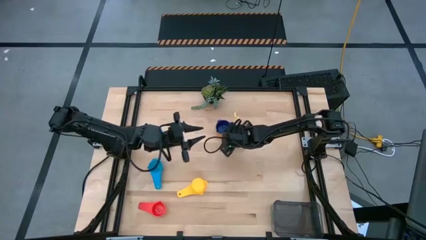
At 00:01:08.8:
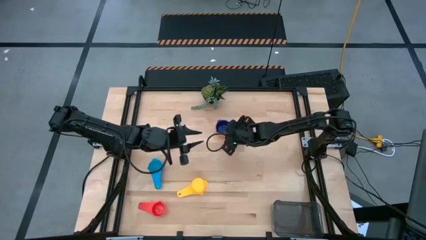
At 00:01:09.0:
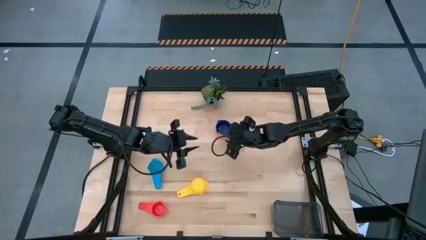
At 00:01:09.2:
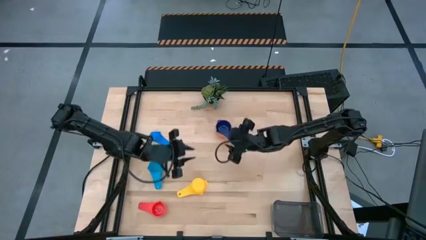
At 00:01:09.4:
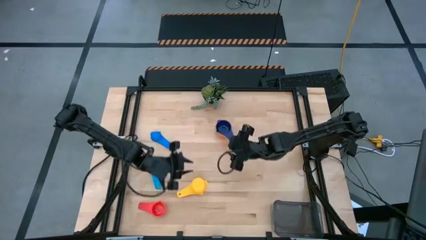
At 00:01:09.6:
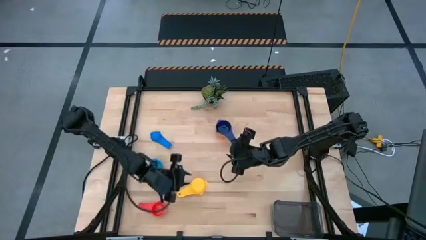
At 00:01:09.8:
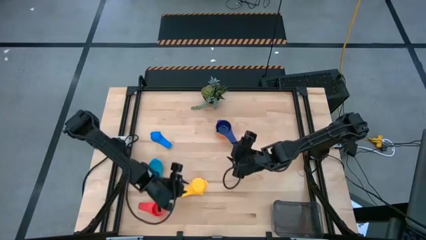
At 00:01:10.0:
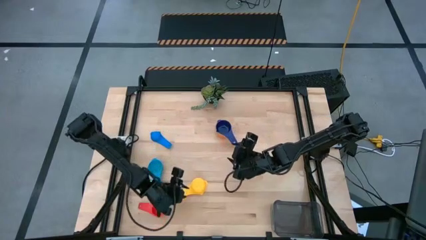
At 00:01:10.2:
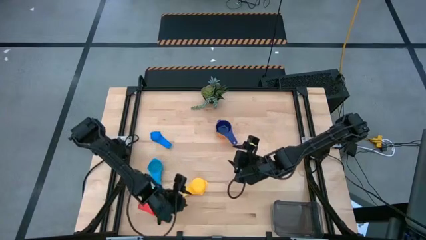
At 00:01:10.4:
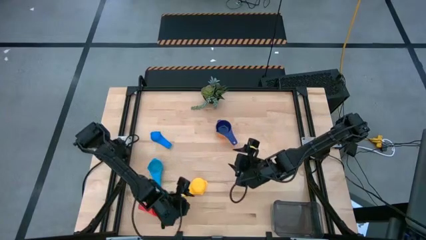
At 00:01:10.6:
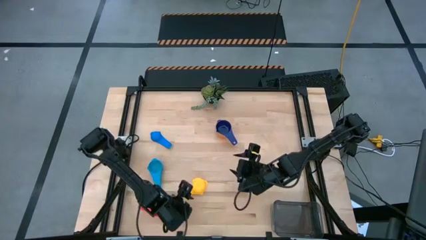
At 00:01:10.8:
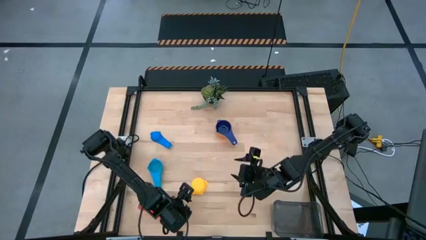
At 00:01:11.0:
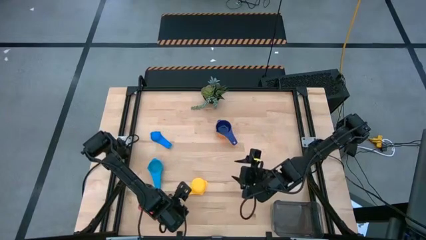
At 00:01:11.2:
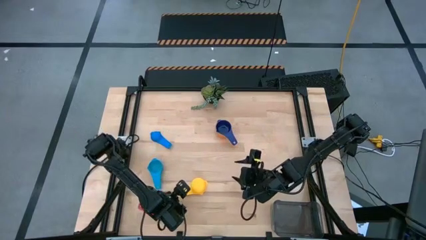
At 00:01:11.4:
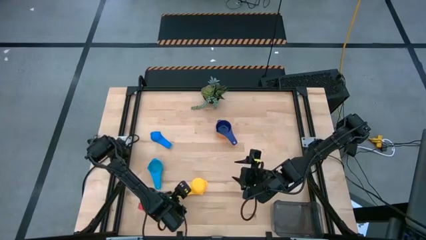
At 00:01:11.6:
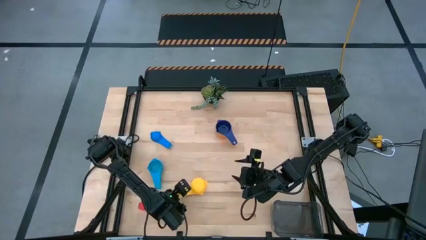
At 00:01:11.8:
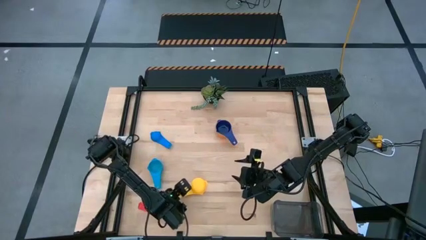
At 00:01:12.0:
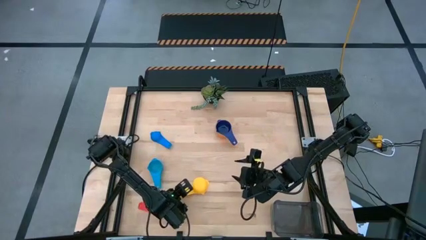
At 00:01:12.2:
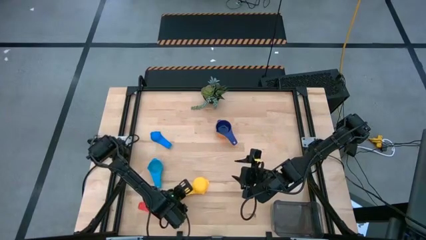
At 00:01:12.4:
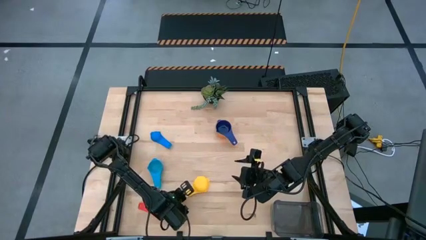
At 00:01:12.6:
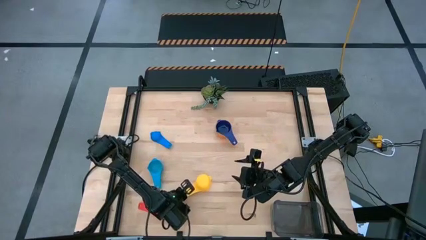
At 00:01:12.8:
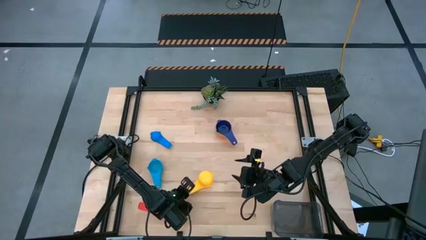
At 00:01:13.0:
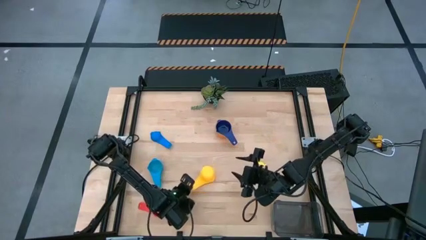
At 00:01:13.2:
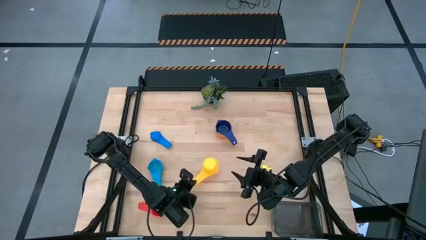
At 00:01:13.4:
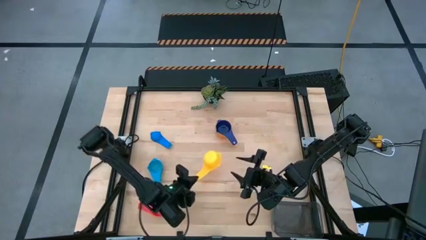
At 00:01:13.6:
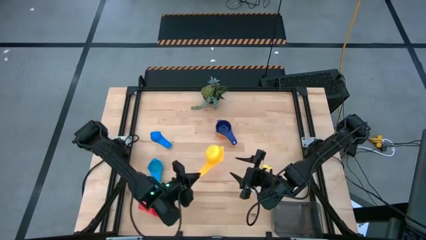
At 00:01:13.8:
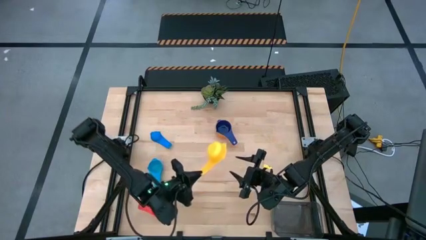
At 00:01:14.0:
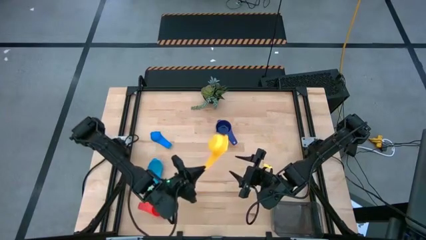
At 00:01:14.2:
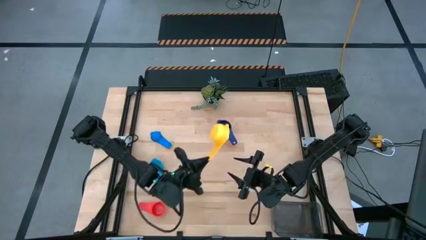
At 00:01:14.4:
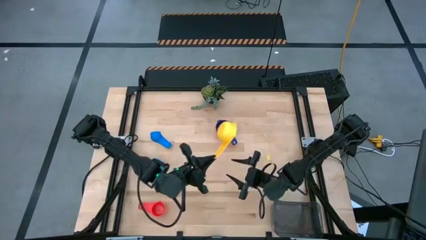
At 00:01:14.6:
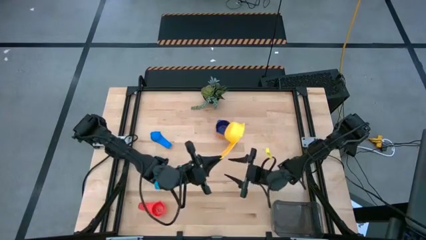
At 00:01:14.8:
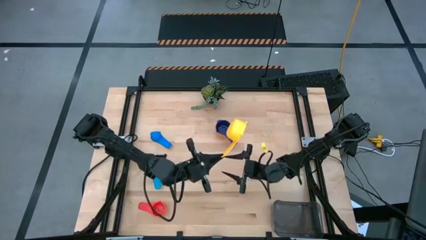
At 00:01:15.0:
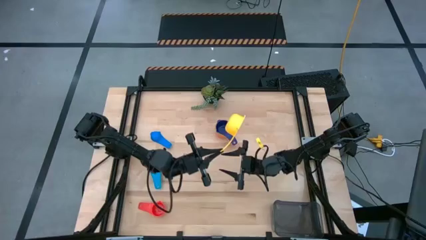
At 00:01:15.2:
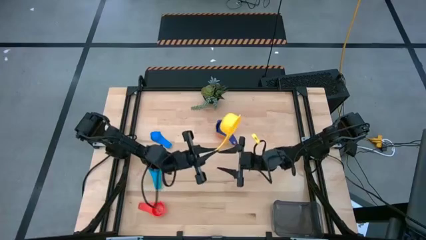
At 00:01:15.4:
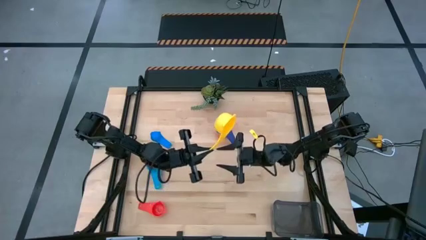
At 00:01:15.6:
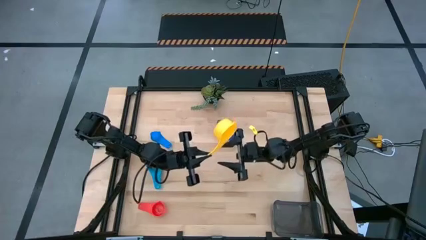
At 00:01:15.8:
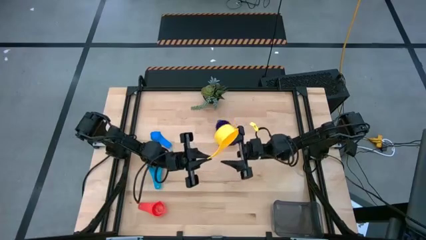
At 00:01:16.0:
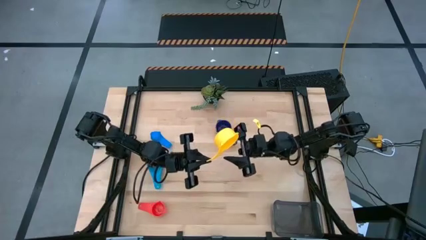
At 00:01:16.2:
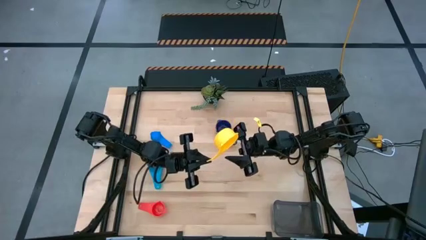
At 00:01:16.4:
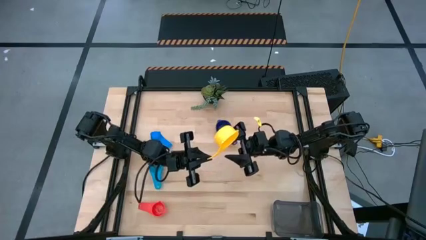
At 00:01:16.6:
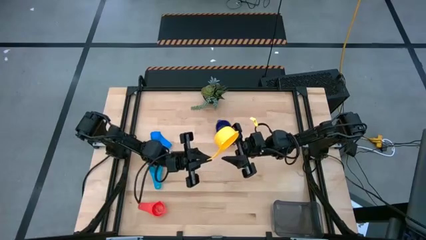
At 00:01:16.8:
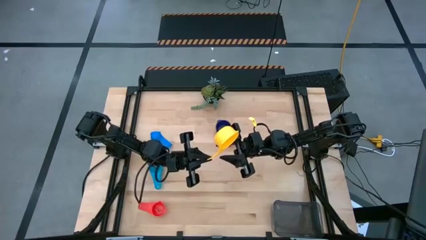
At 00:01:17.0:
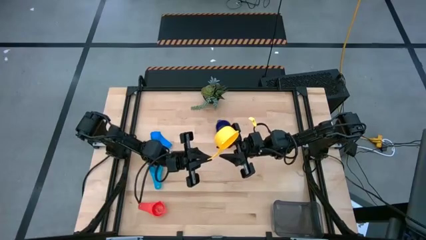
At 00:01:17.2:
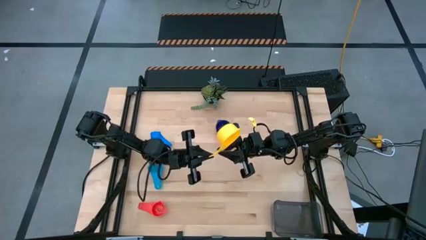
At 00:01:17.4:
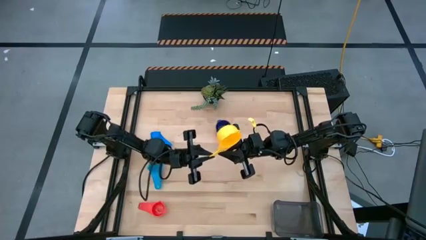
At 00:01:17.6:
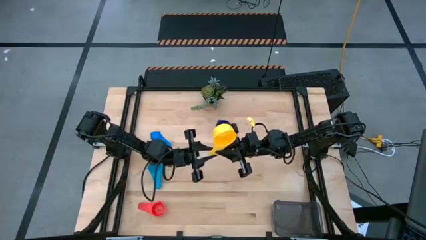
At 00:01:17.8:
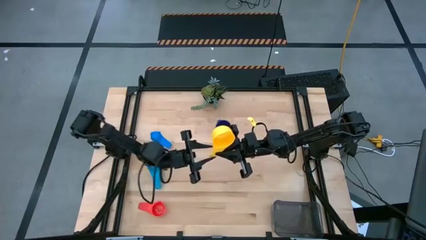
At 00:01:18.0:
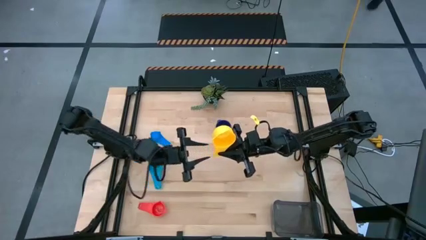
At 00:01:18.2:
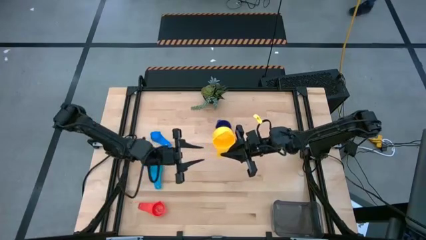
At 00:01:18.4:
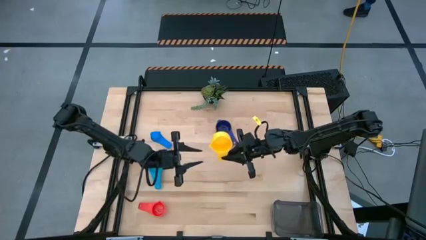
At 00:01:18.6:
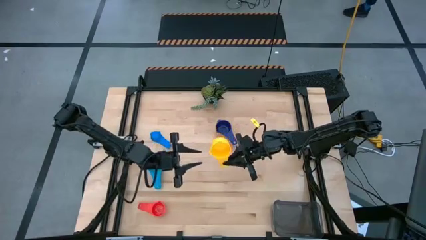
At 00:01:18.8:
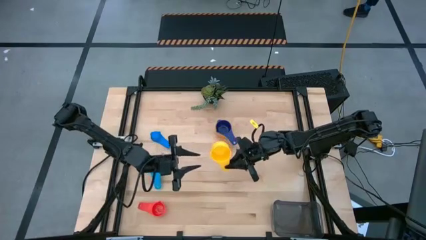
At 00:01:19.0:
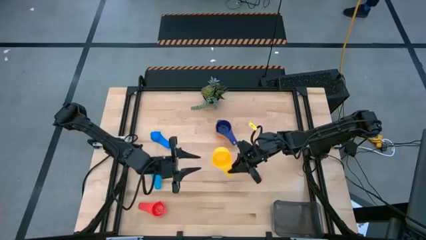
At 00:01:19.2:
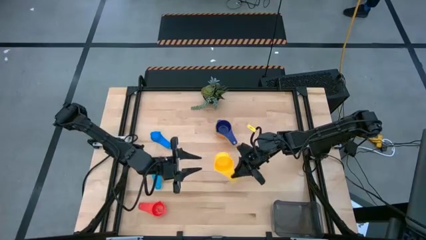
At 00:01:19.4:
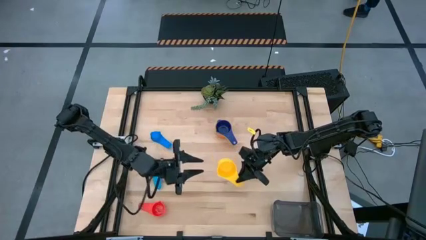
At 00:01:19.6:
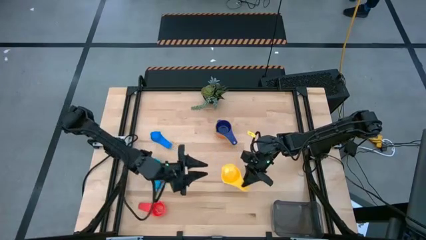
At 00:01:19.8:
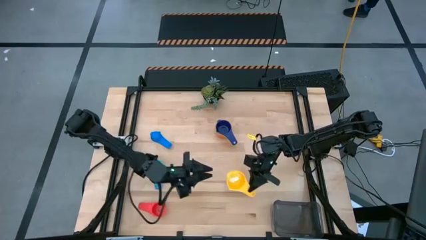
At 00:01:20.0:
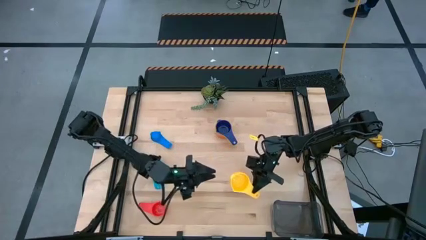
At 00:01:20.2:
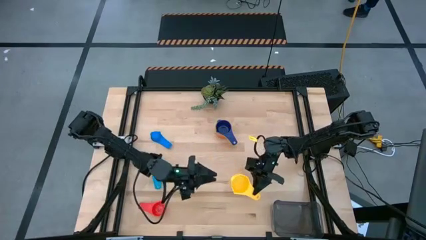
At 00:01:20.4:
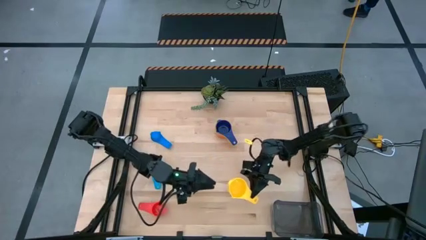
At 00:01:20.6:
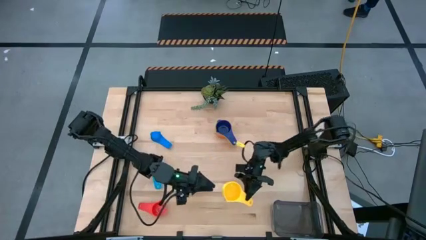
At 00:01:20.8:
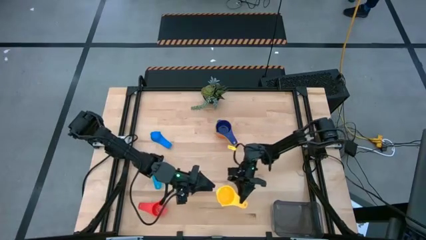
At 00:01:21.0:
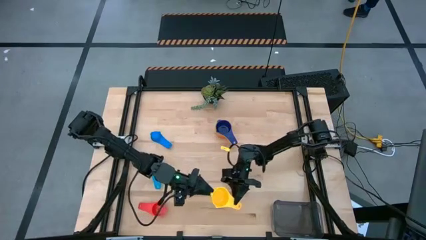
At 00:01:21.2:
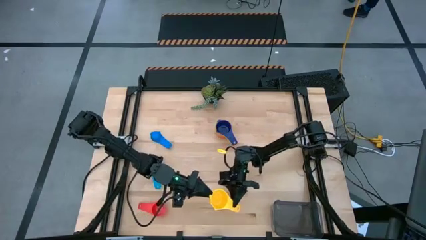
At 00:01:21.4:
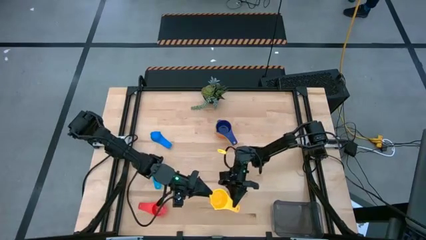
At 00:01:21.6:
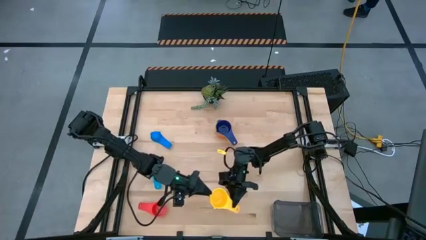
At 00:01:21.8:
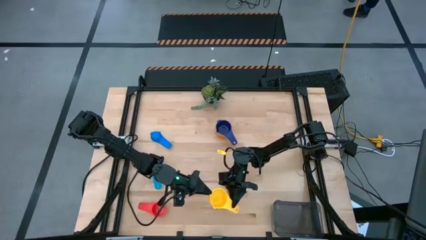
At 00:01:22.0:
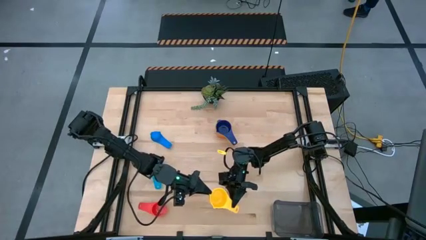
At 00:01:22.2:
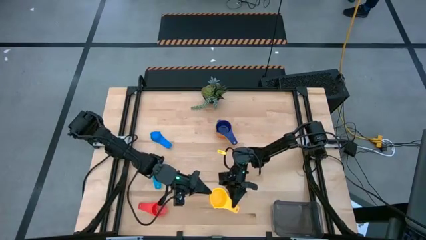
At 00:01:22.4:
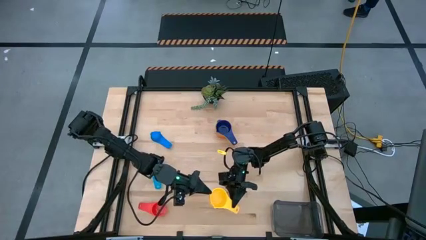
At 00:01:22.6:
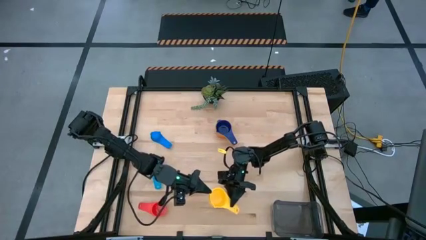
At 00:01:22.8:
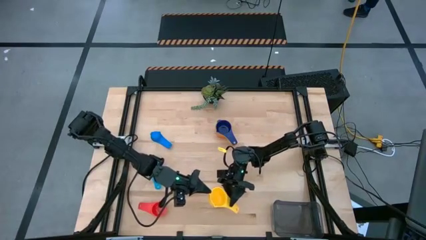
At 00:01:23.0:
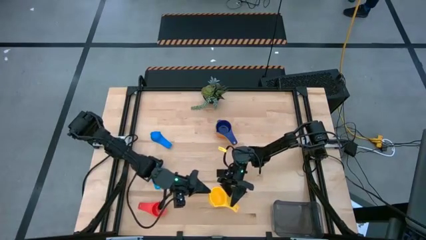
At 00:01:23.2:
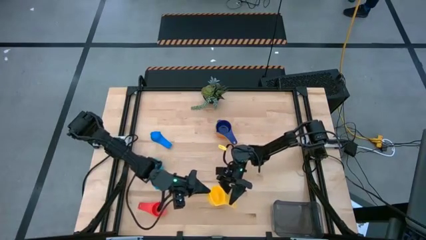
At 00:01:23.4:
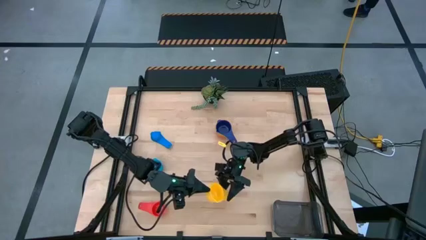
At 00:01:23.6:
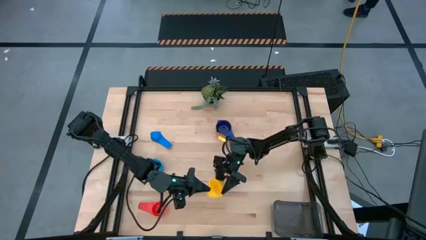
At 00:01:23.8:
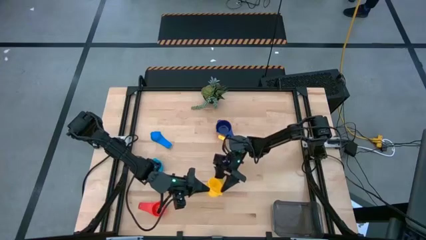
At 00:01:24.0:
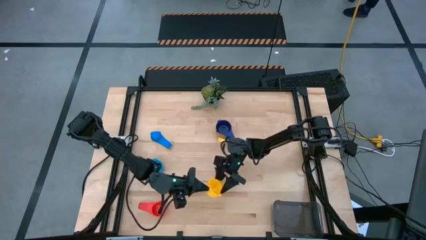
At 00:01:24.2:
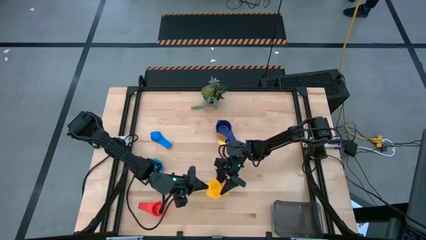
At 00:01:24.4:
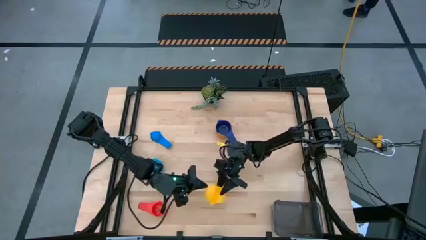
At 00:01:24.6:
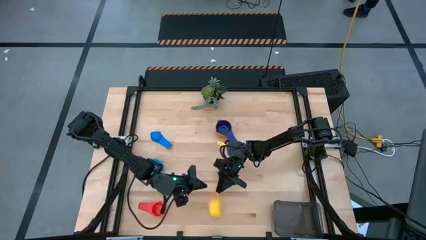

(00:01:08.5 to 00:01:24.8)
Task: Nest measuring cups in basket
Stack the yellow measuring cups on top of the violet measuring cups
